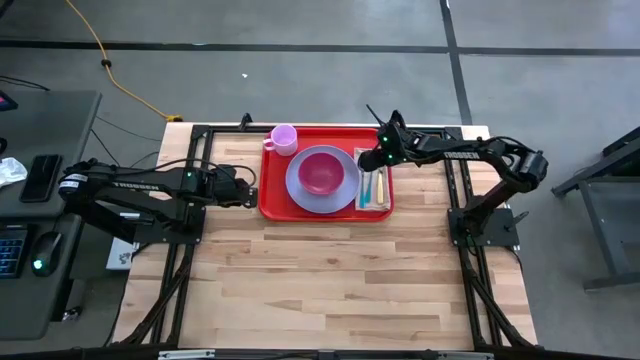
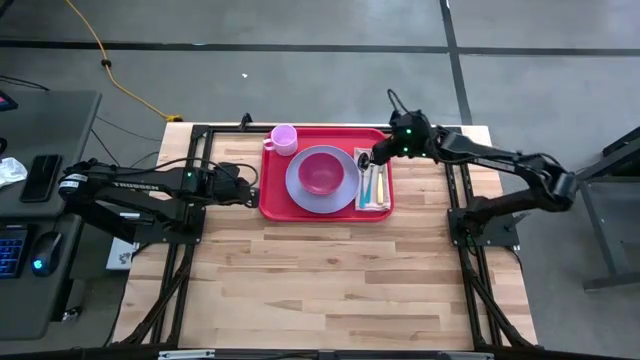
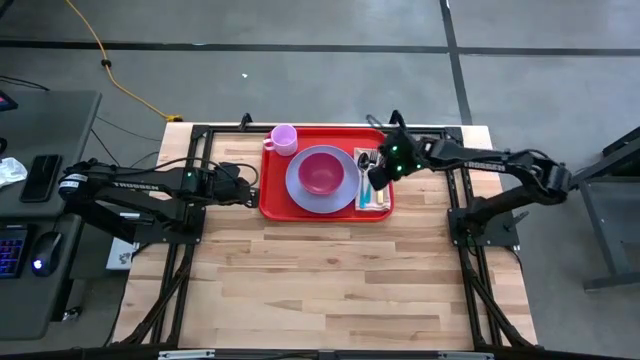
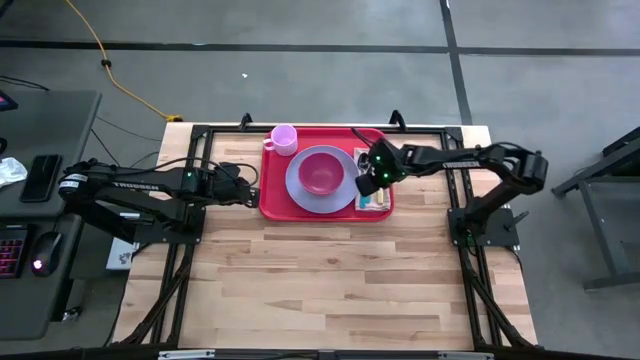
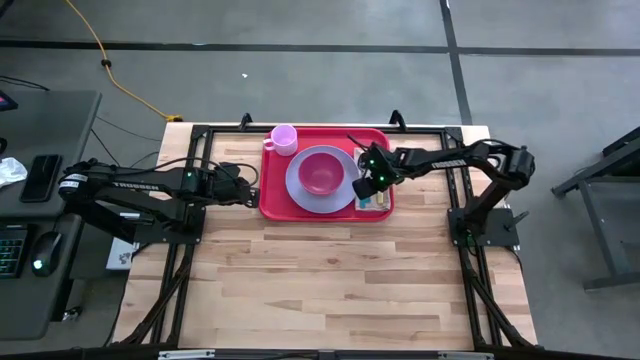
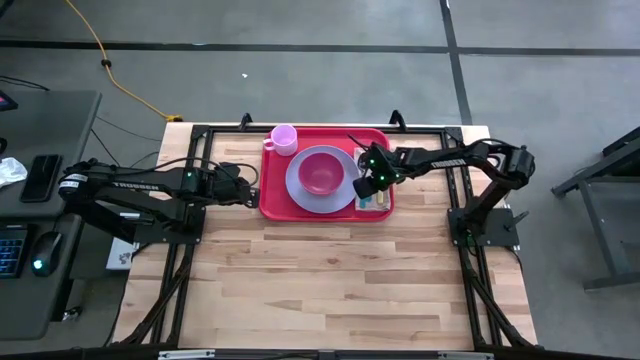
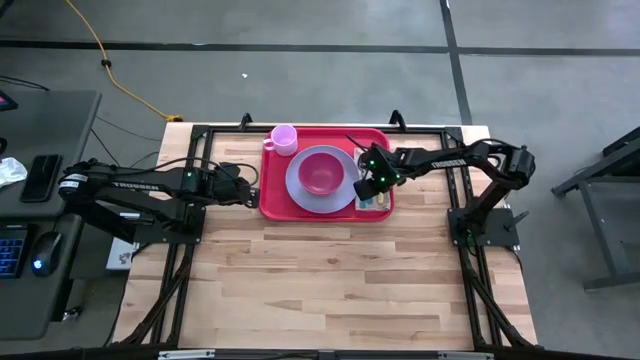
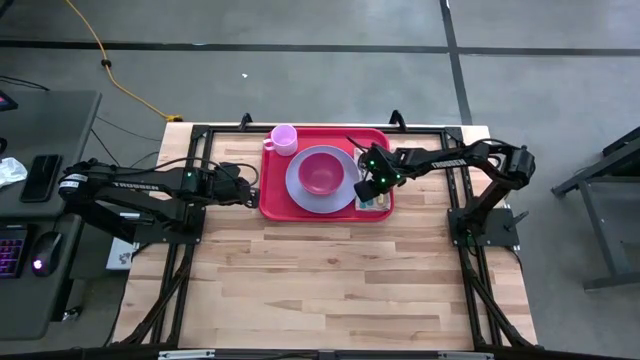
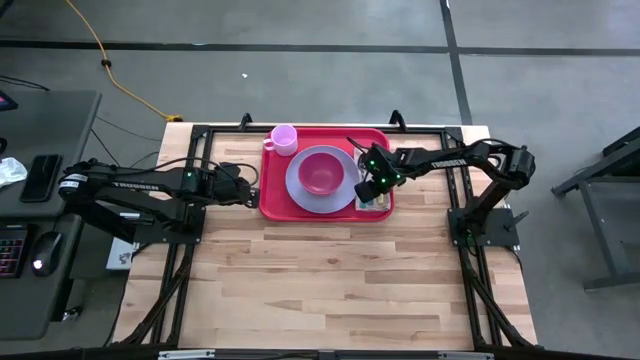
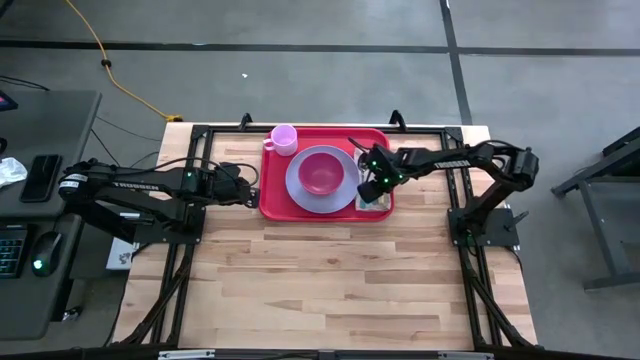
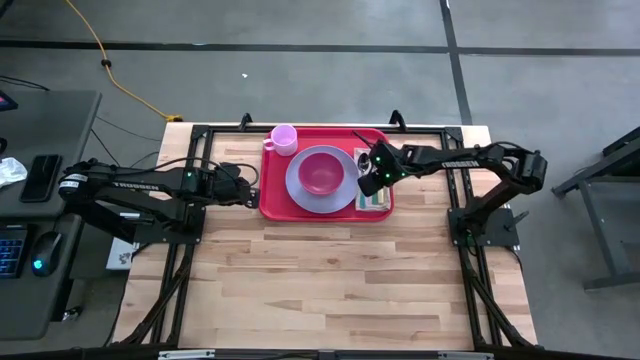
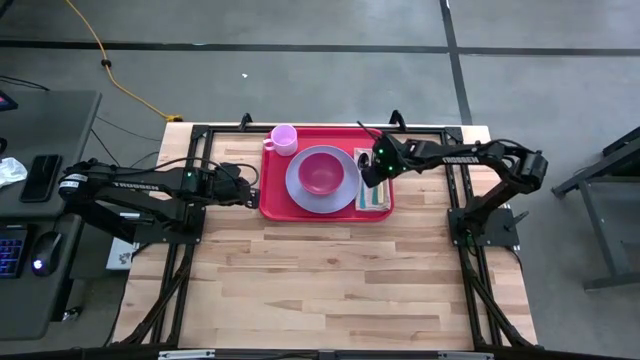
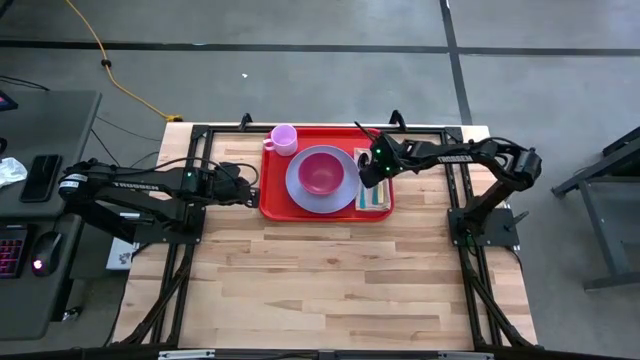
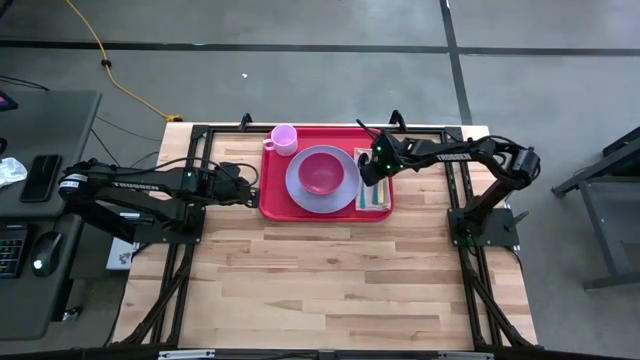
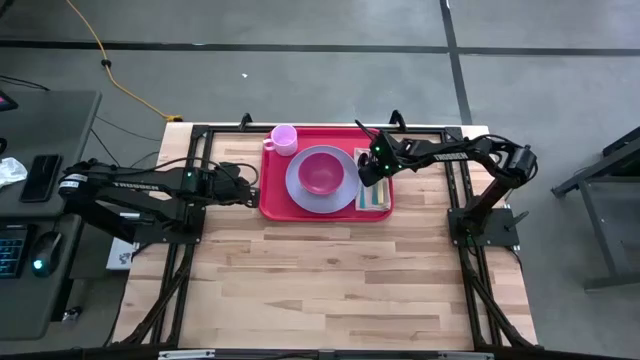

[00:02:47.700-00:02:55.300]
Task: Set up tray
Adjust the blue fork on the brown napkin

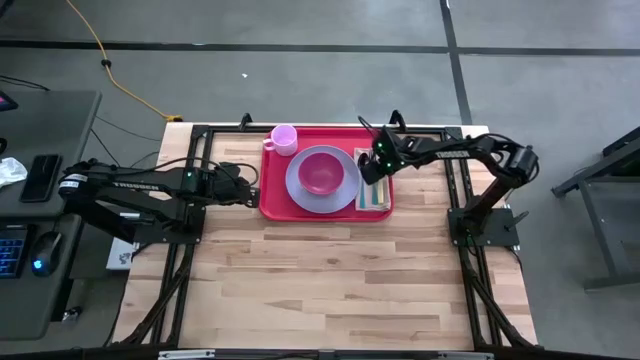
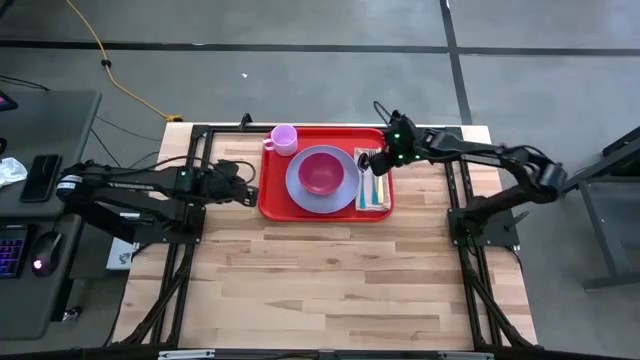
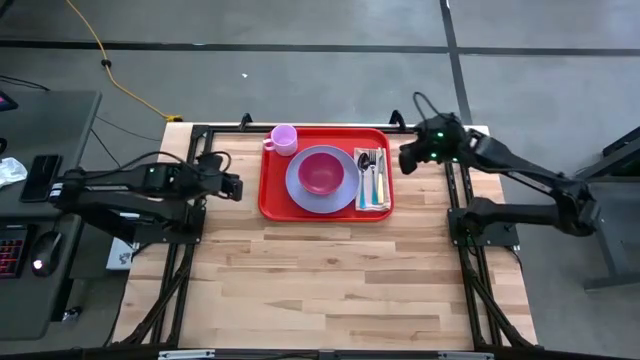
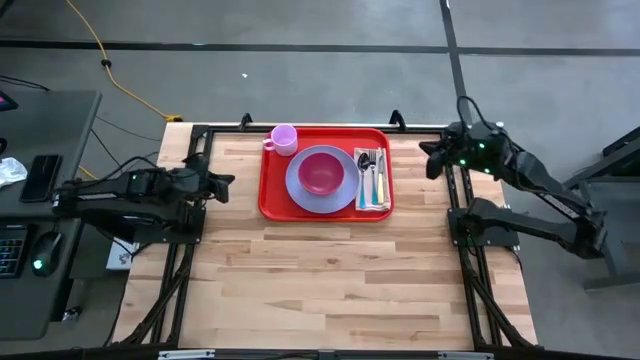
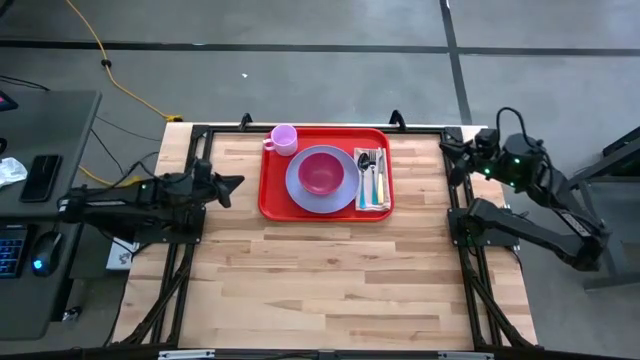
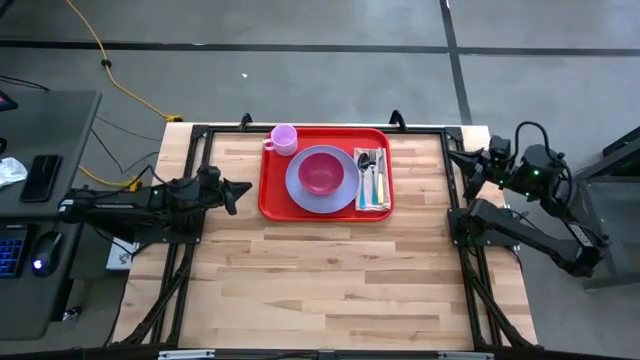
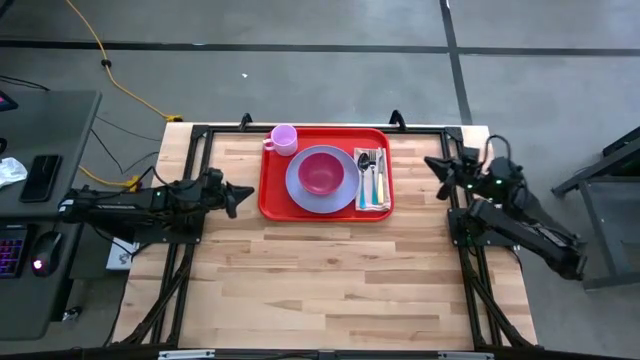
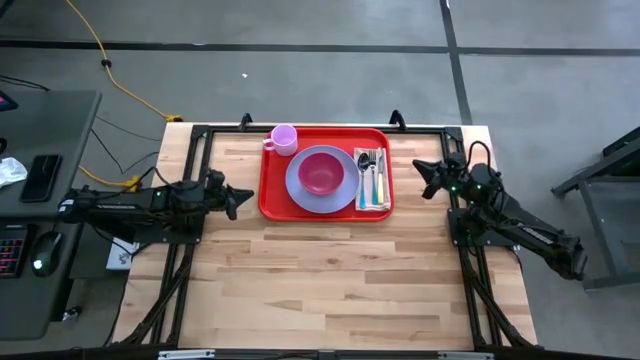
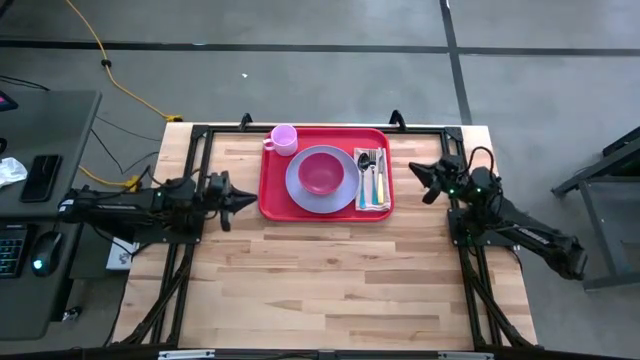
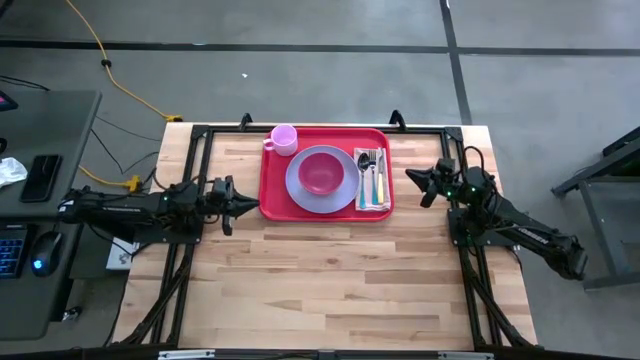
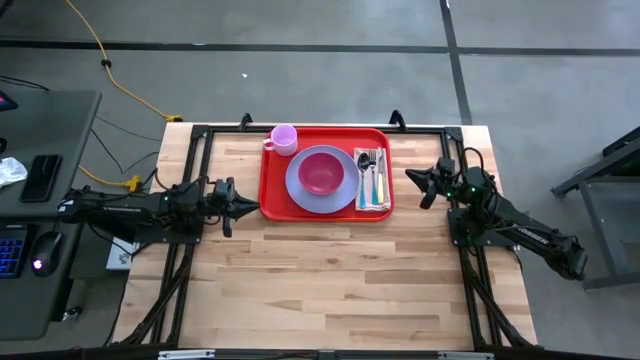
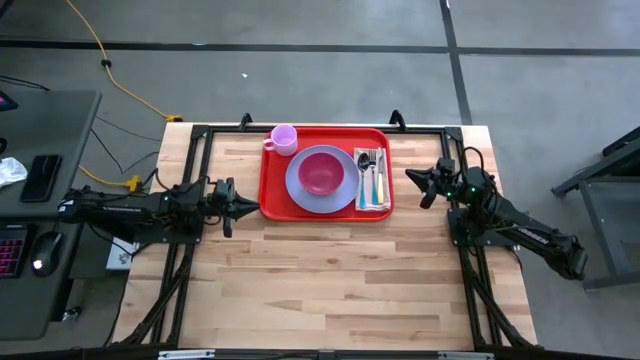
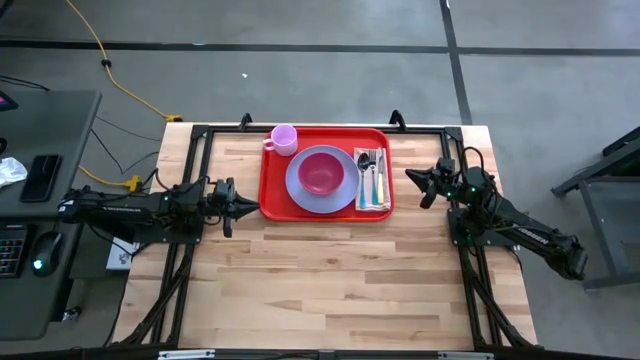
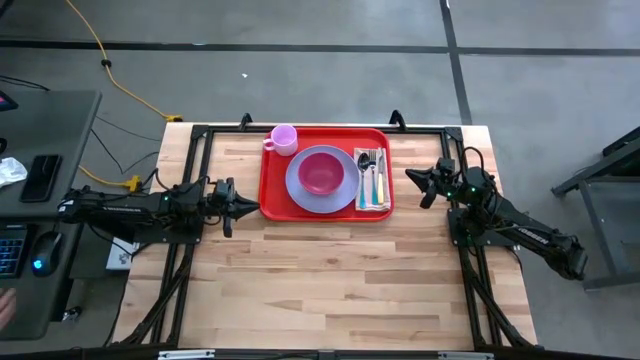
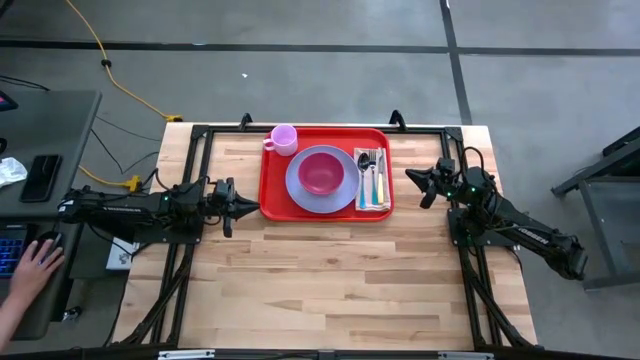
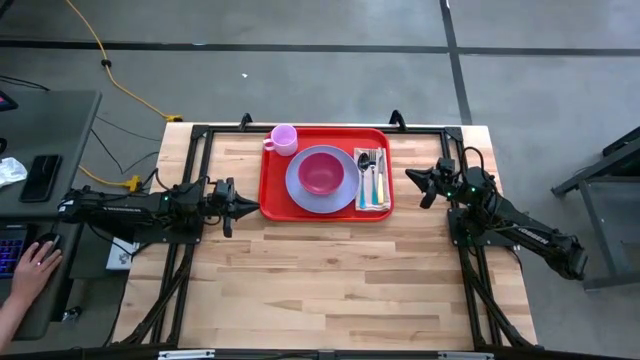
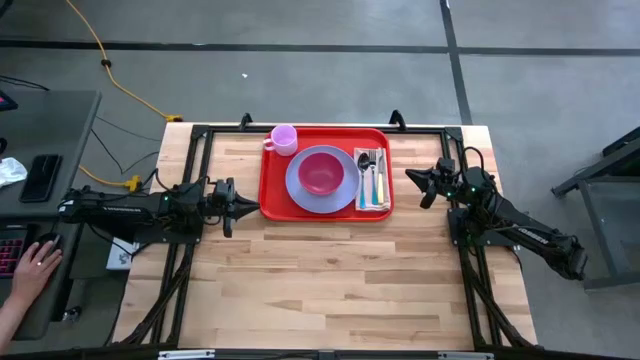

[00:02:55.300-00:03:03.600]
Return to Home Position

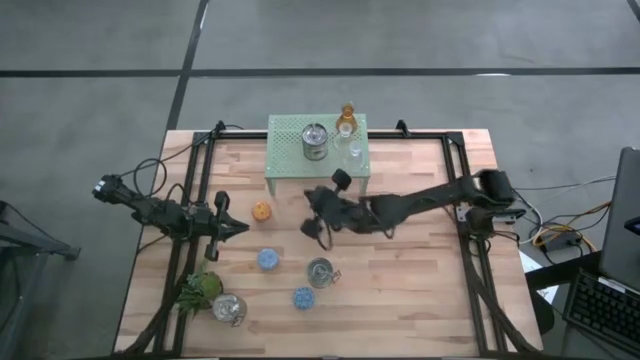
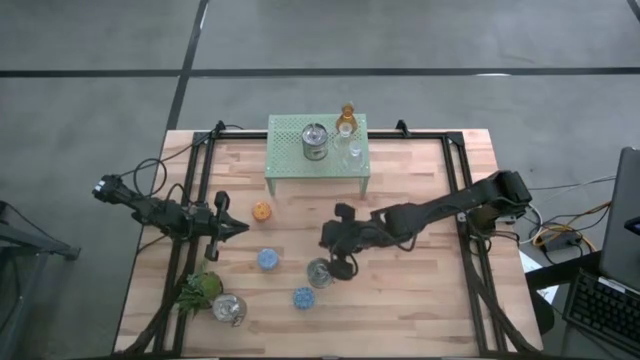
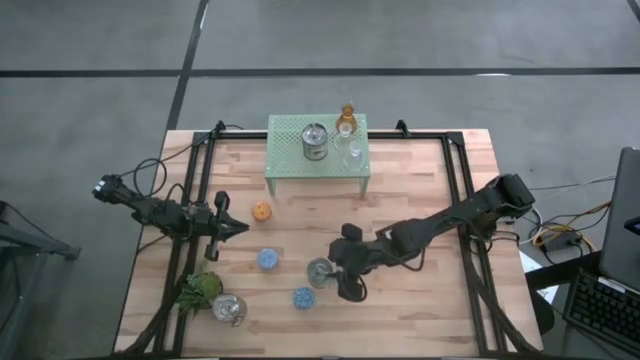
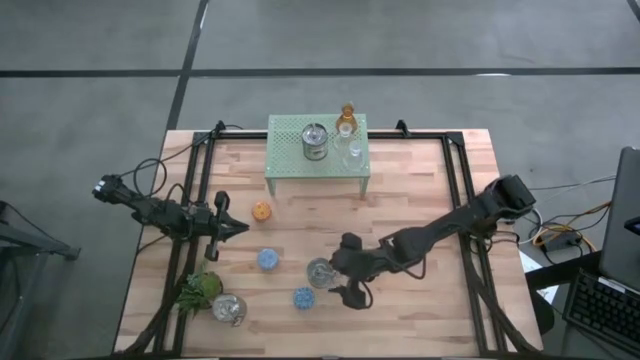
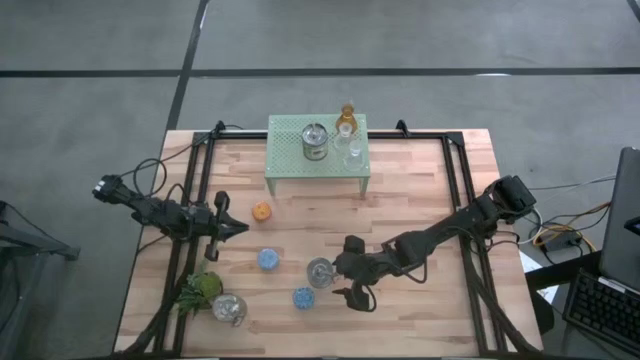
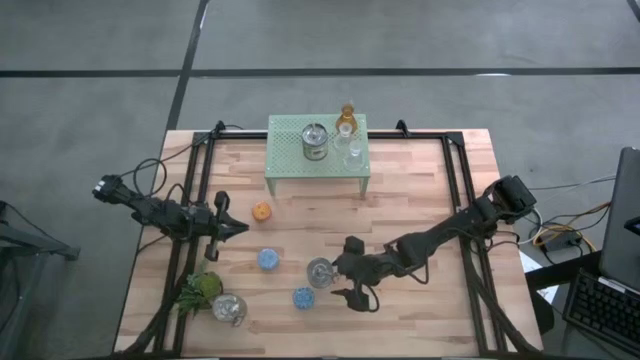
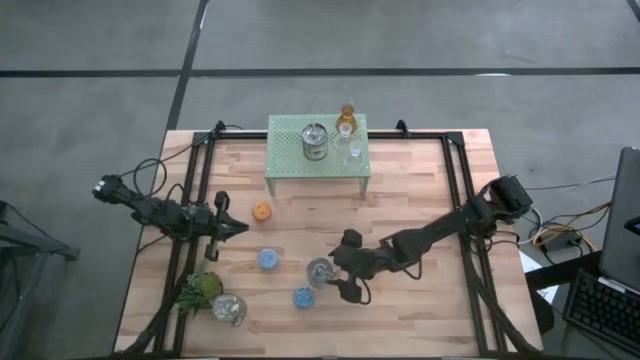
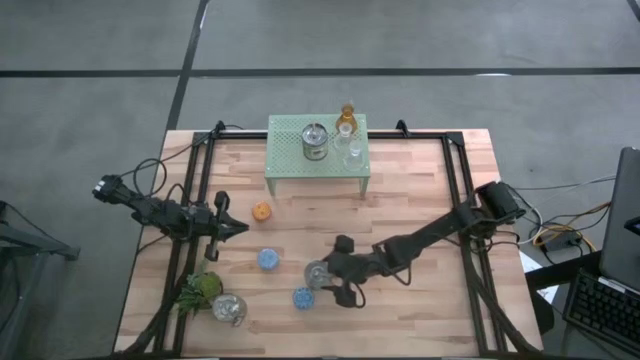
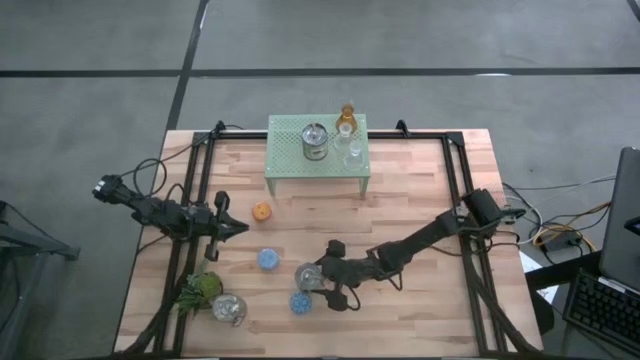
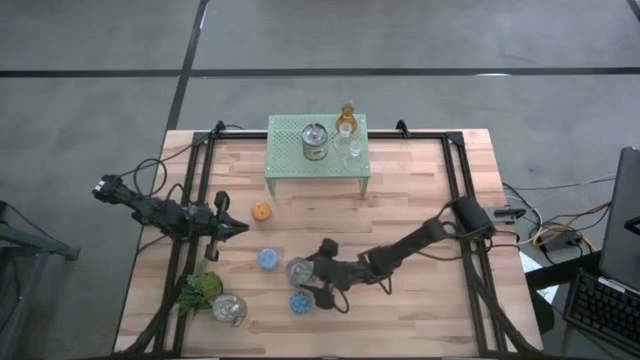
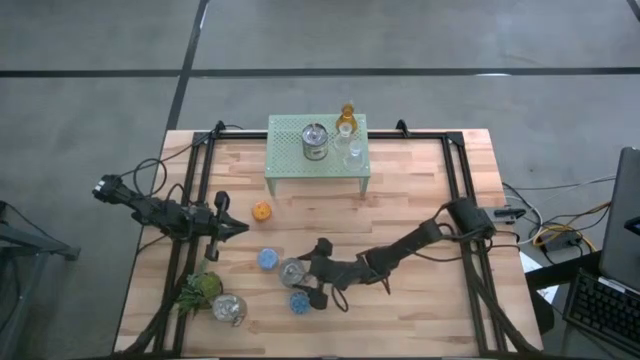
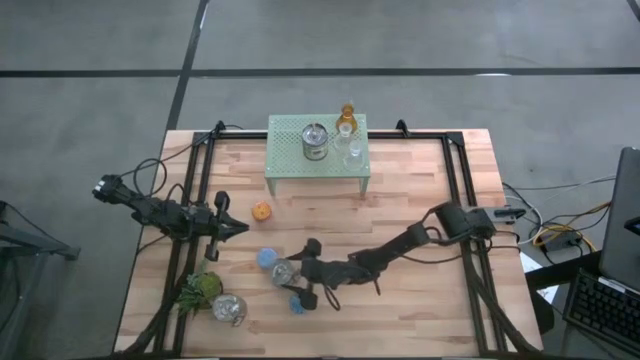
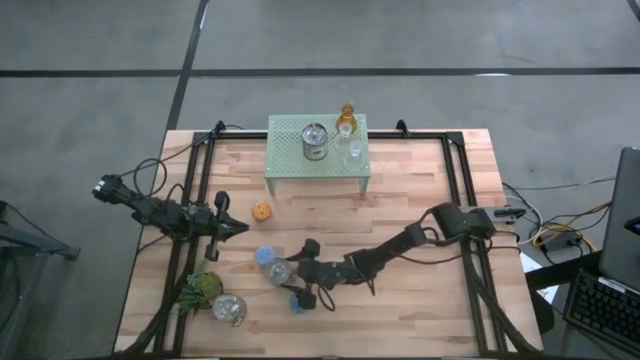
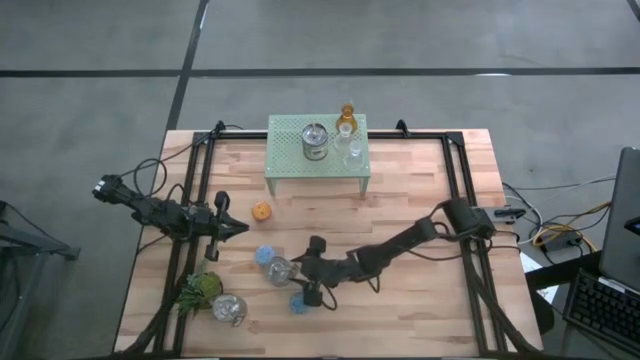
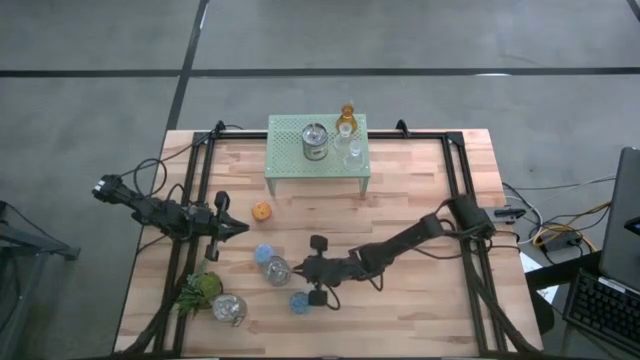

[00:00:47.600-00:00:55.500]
Task: Pick & Place candle stick holders
Put the middle scented candle on the shelf
